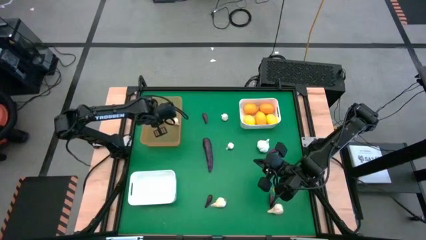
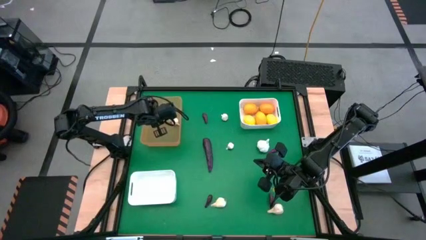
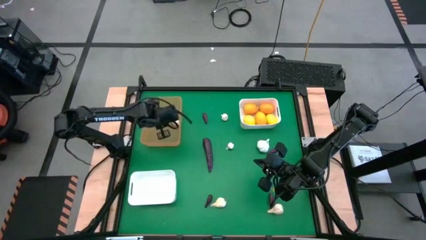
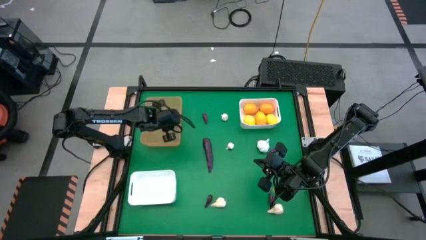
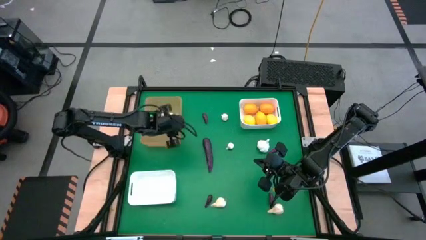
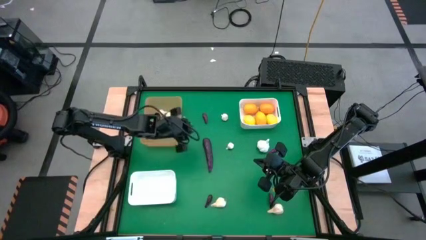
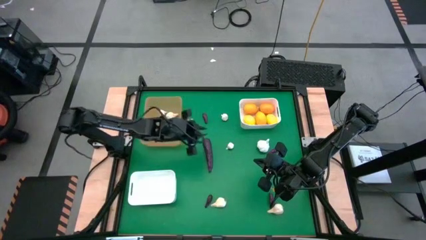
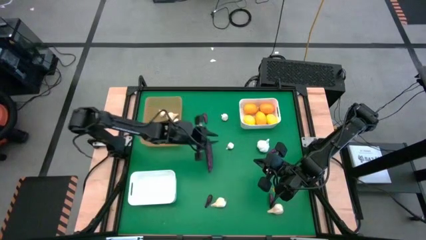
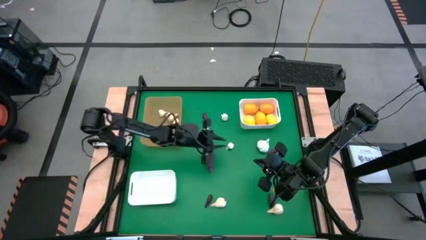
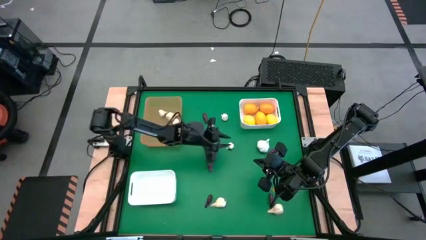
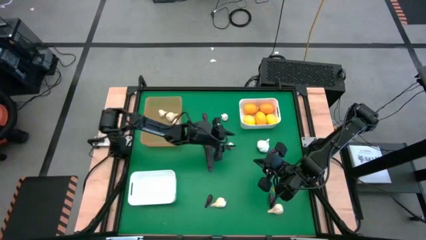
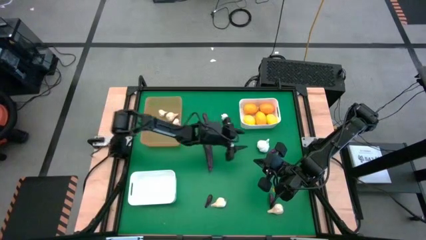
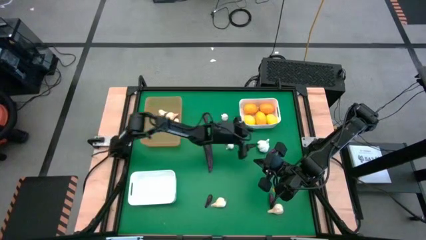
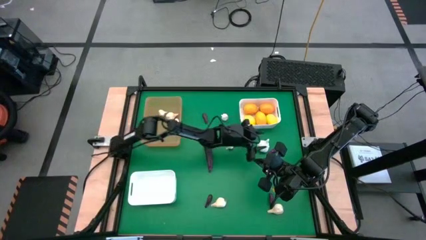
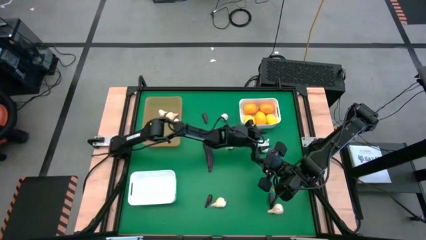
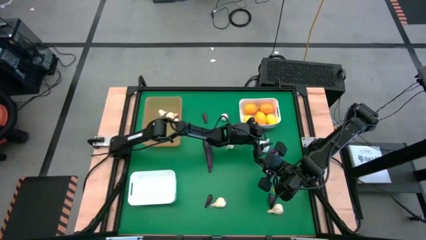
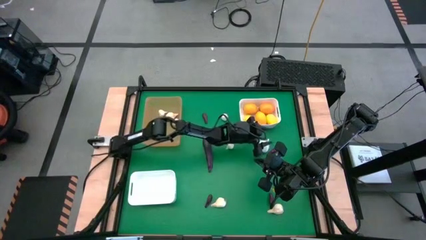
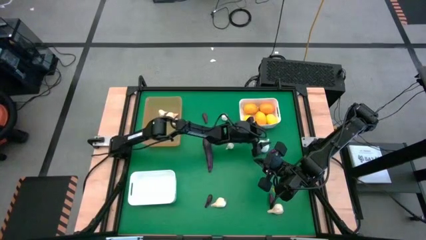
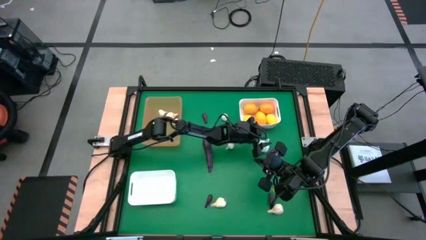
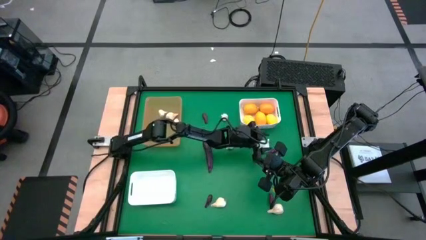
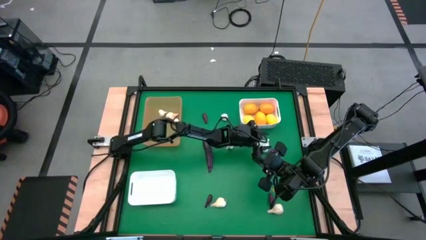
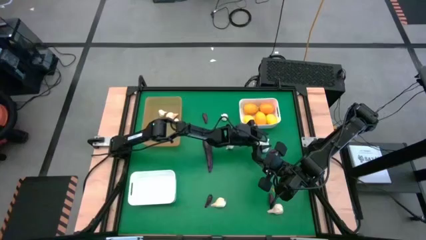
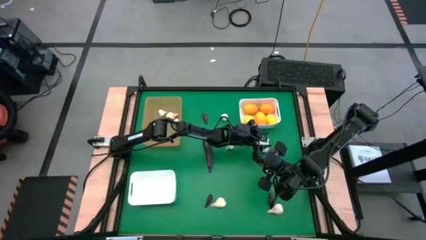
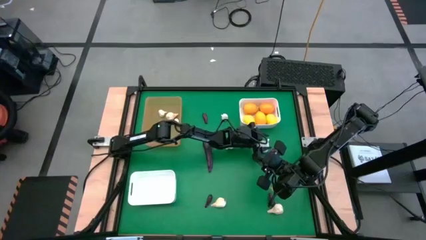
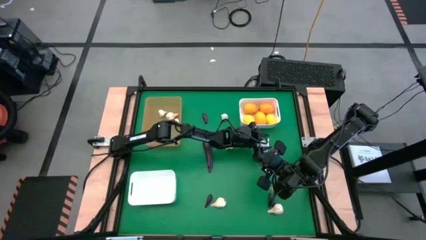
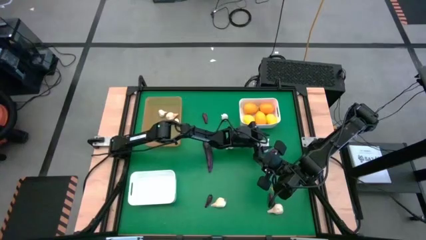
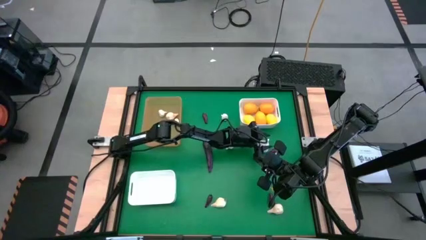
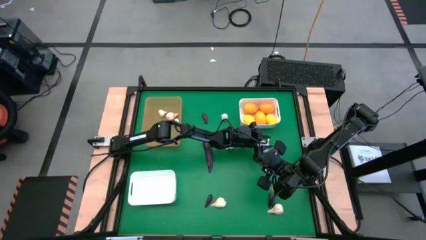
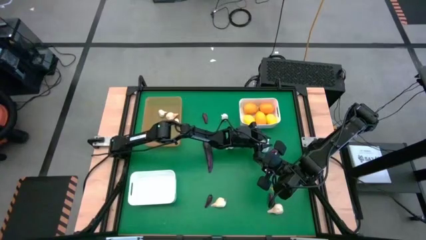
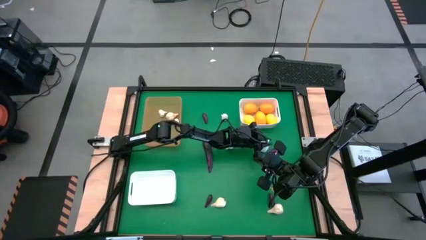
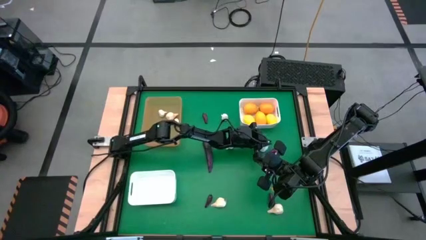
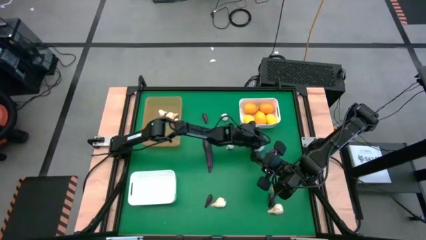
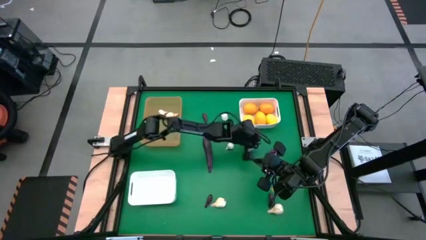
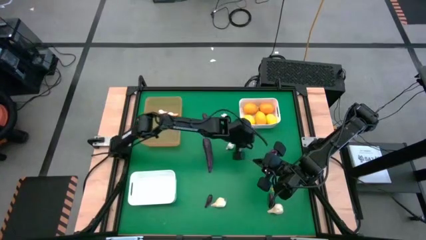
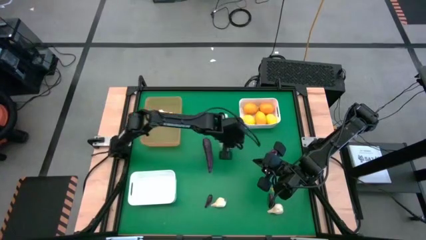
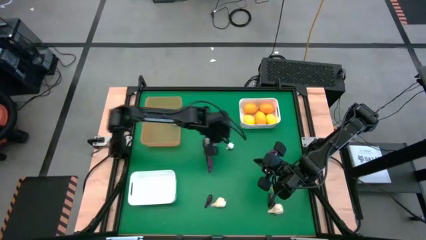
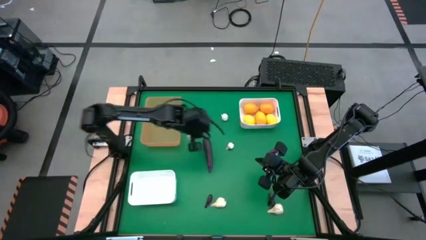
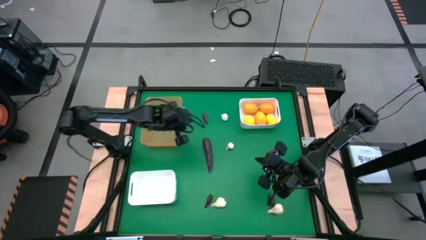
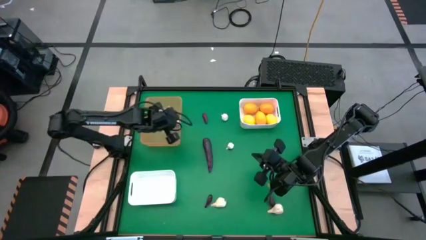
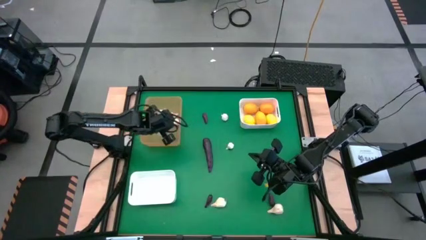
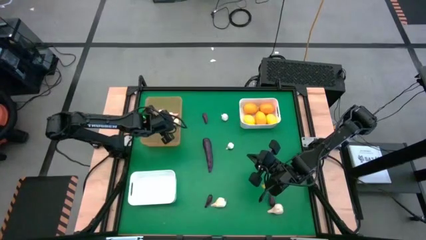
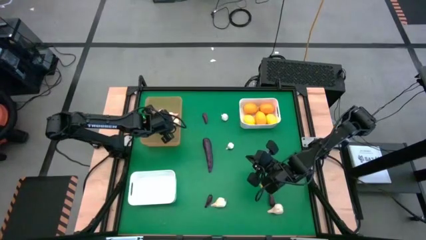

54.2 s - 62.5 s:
Task: Sort produce into baskets
Put the white garlic into the orange bin

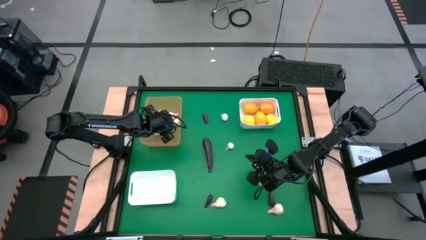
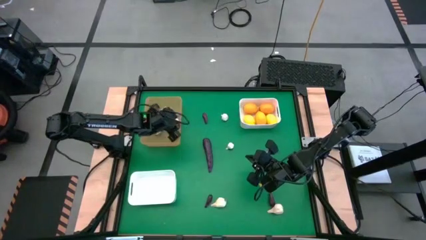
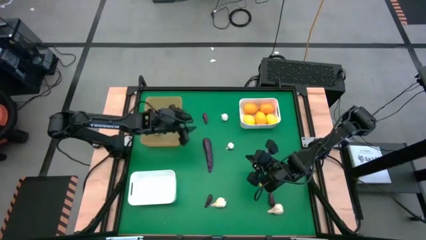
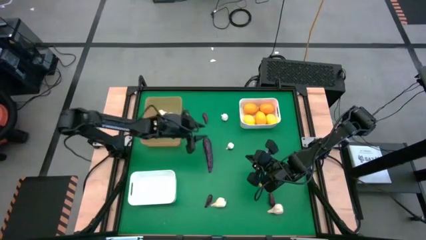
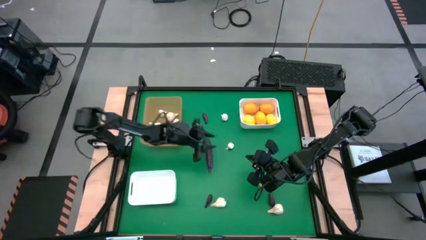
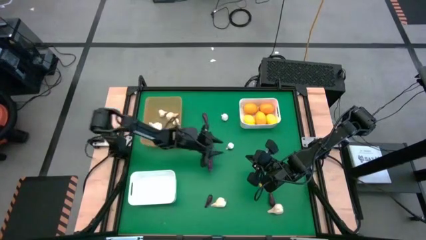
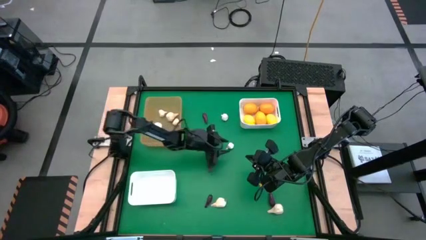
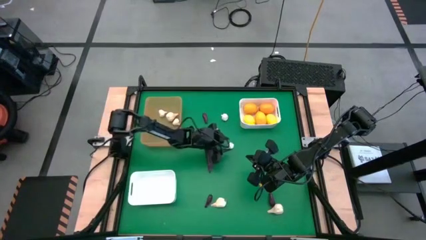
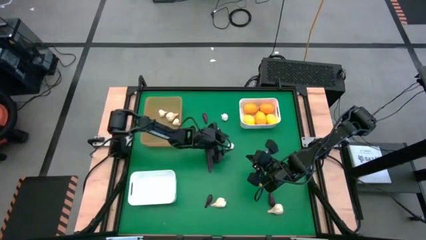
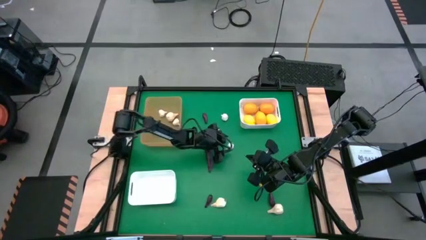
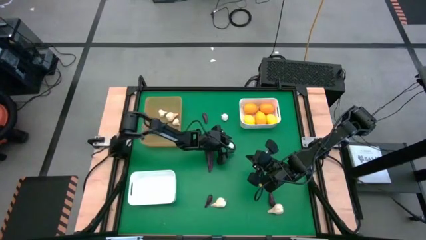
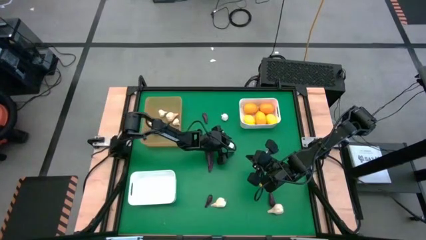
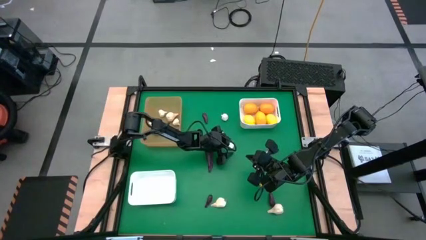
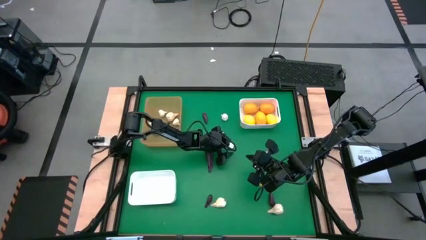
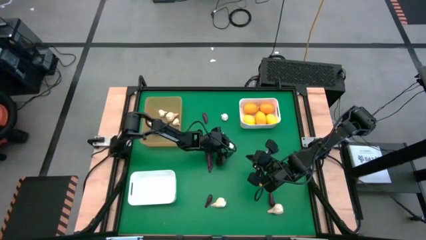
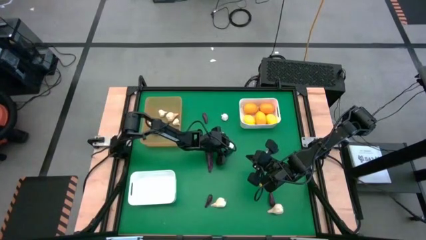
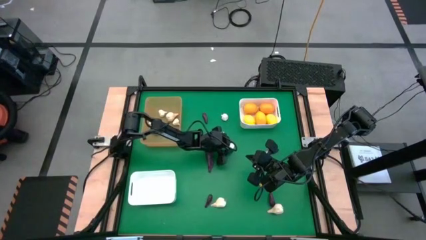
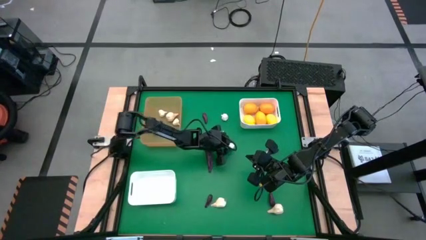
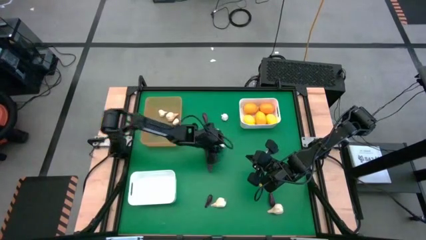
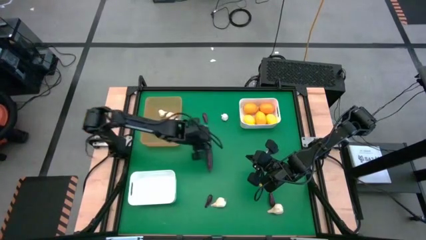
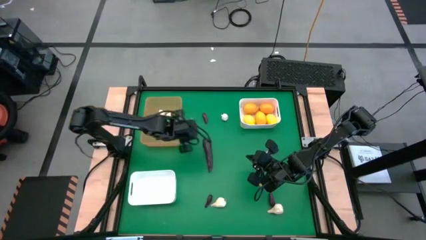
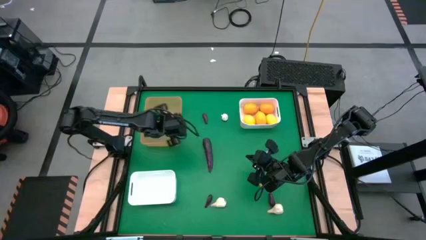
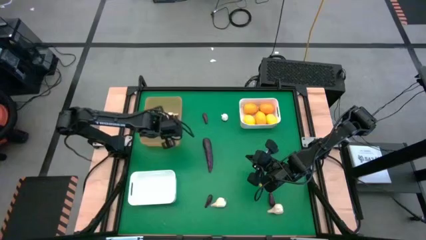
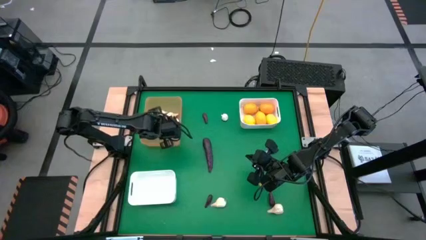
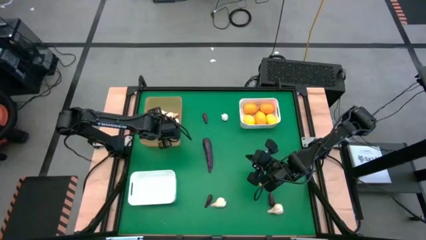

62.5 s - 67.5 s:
Put the white garlic into the orange bin

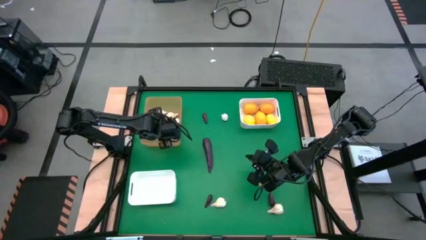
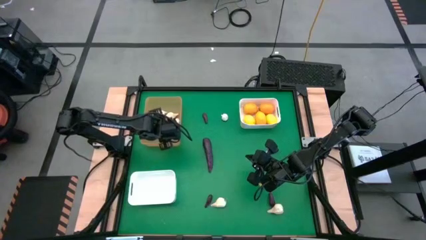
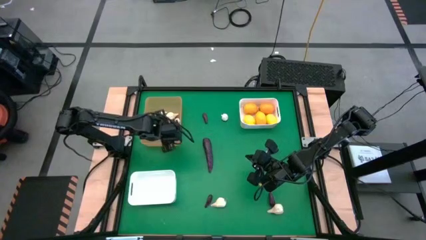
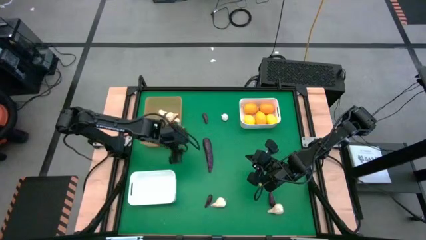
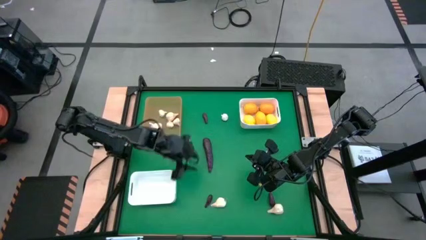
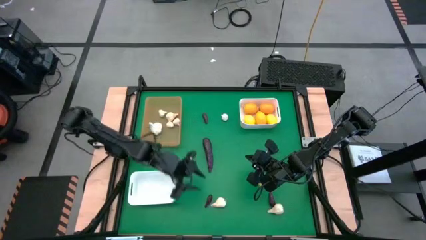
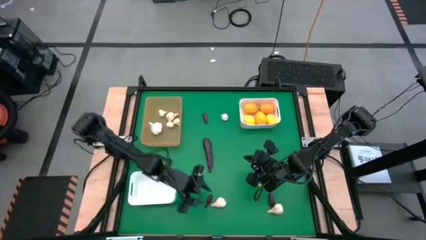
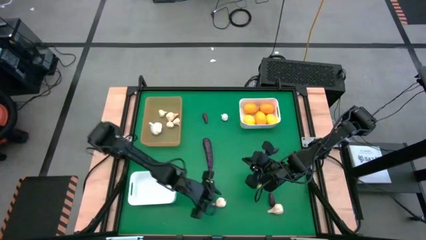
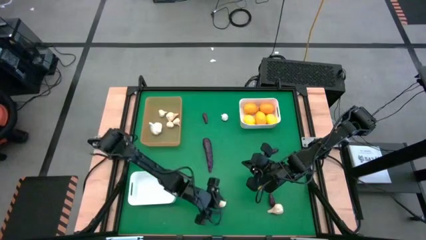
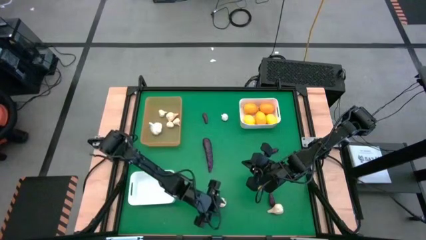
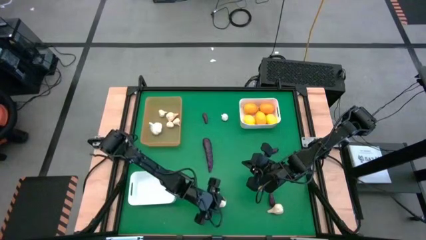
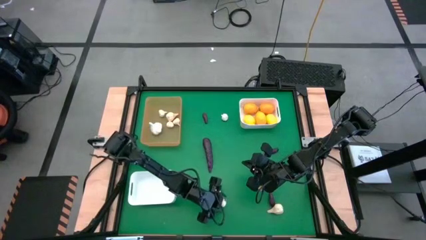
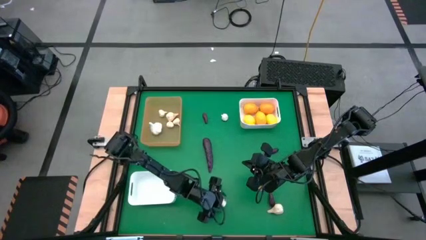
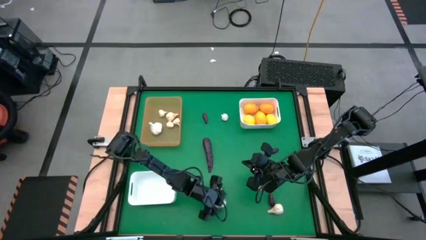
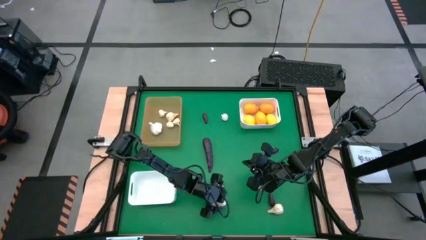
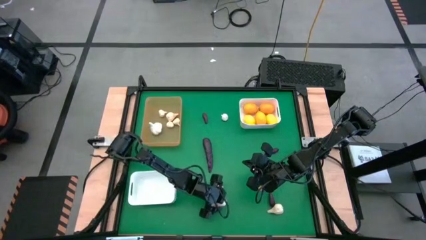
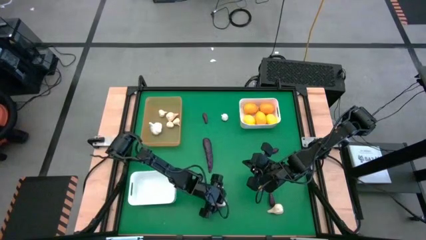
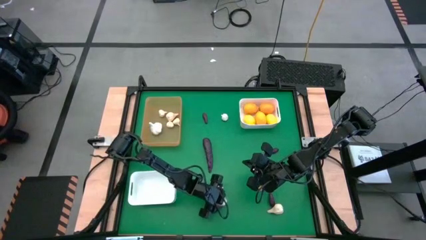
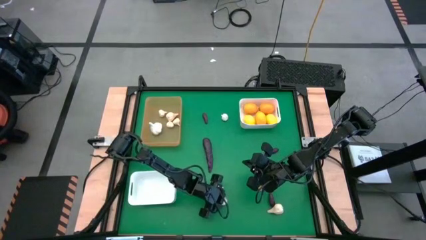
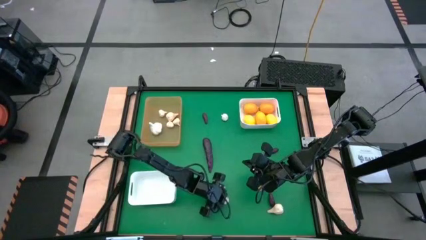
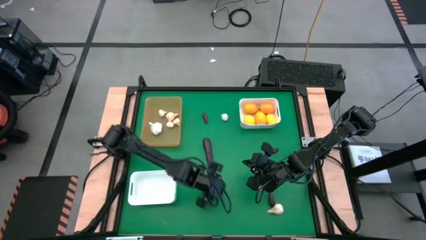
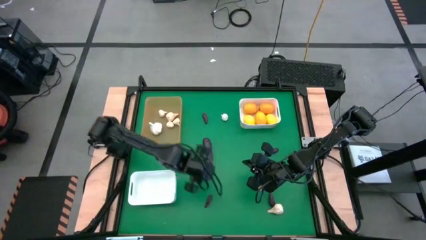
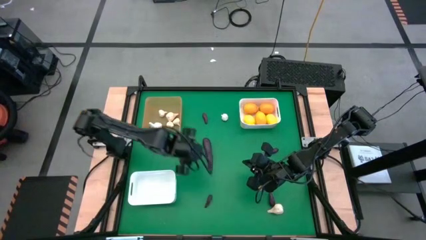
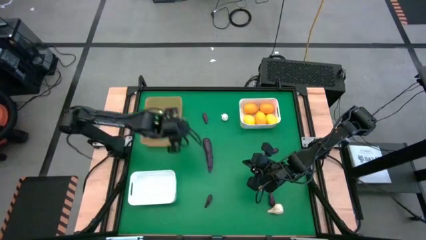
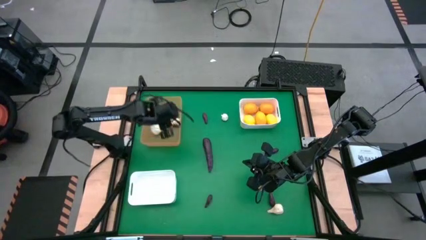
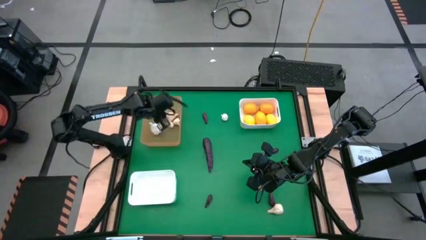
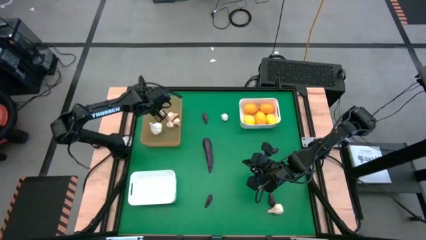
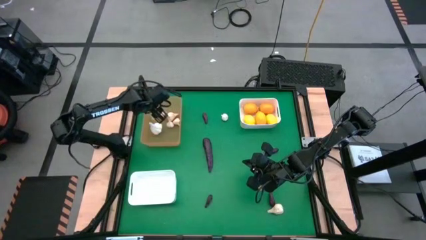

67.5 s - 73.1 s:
Put the white garlic into the orange bin
